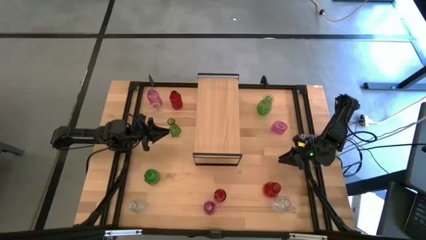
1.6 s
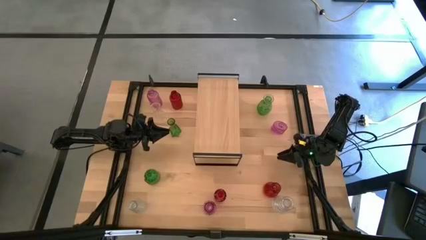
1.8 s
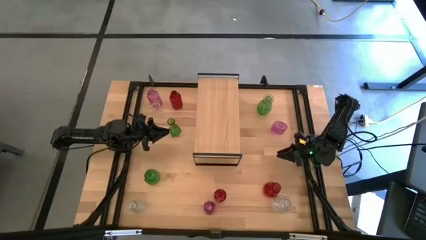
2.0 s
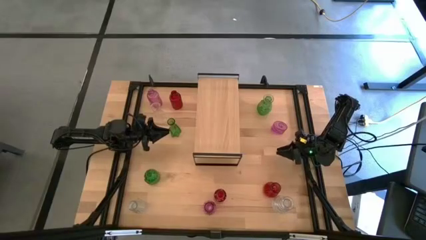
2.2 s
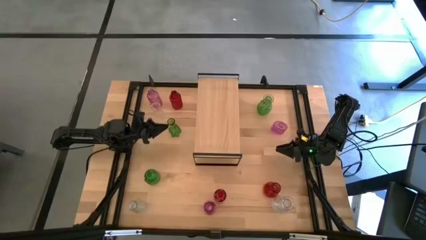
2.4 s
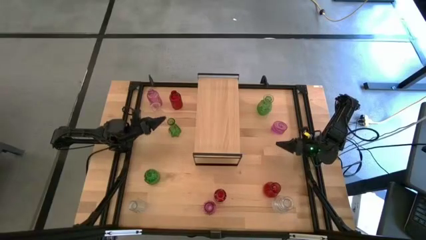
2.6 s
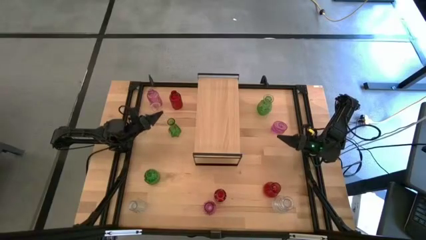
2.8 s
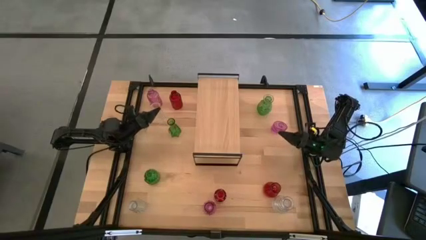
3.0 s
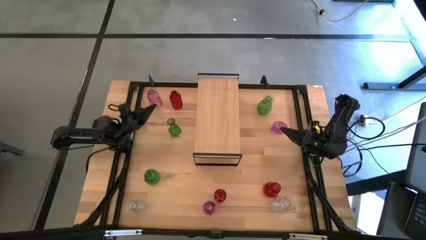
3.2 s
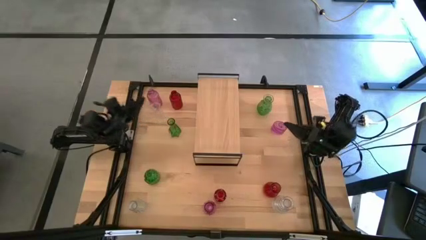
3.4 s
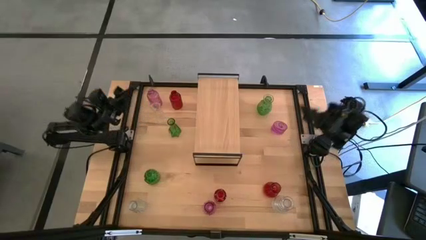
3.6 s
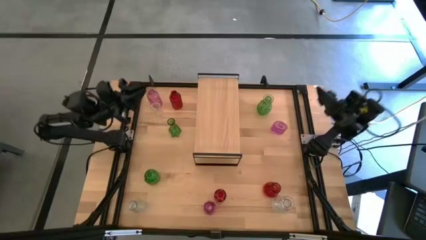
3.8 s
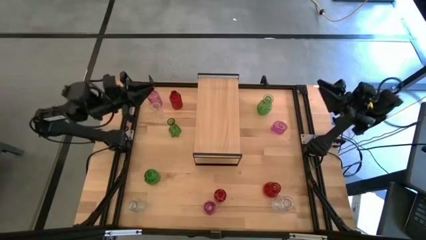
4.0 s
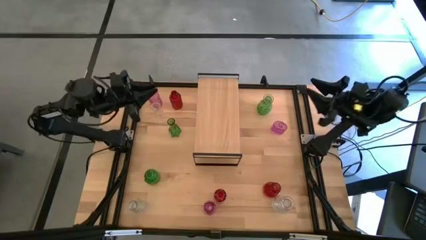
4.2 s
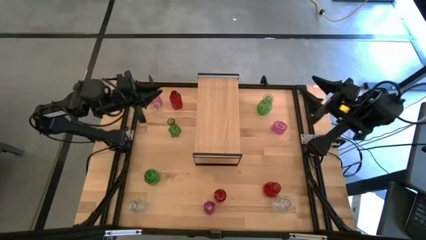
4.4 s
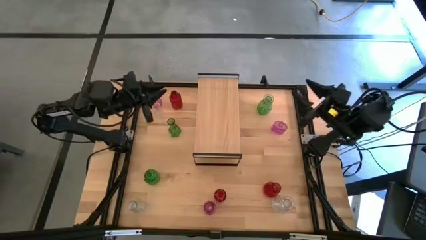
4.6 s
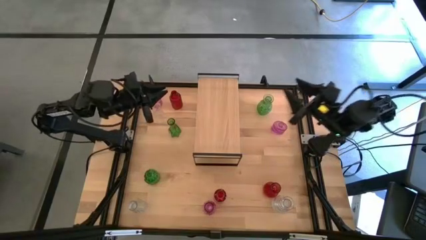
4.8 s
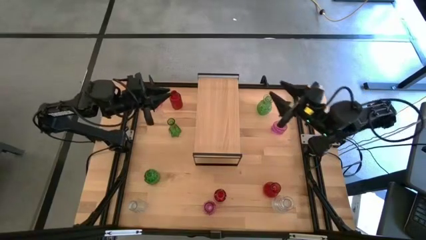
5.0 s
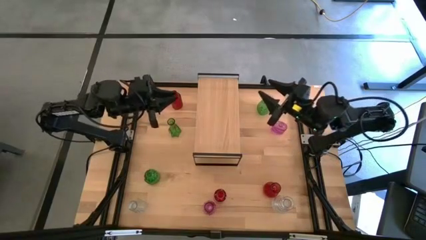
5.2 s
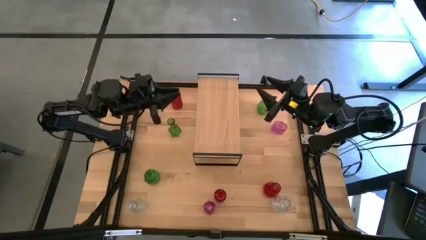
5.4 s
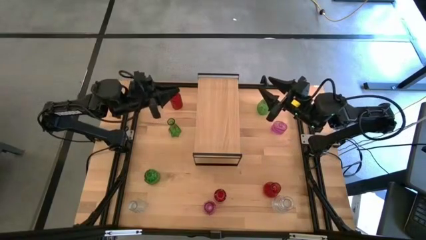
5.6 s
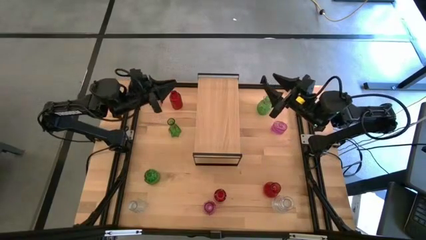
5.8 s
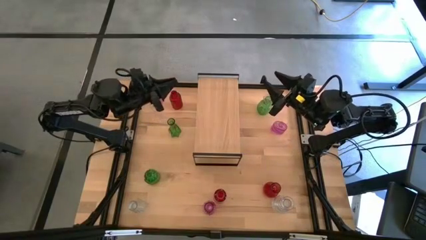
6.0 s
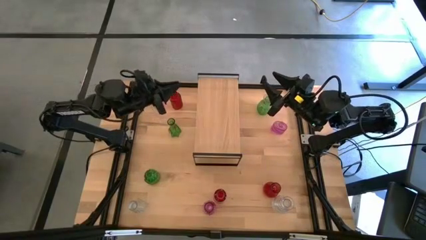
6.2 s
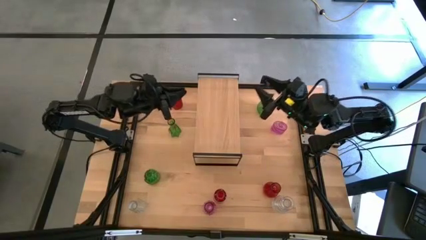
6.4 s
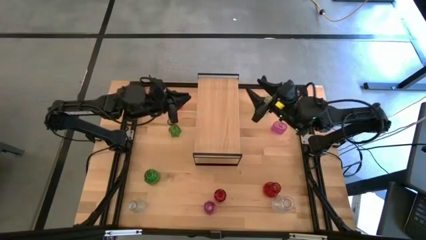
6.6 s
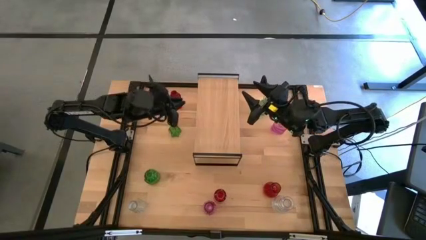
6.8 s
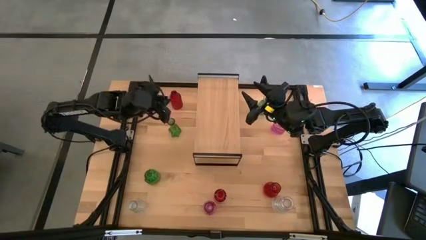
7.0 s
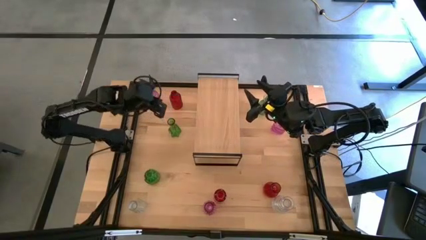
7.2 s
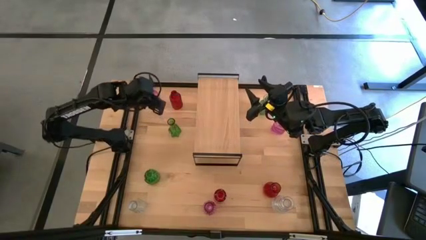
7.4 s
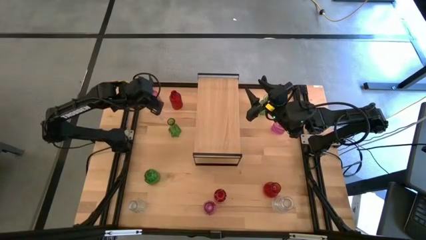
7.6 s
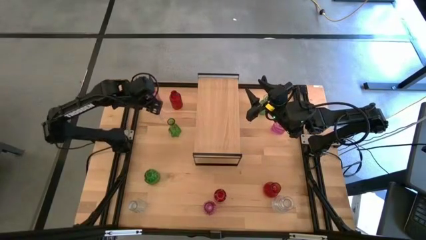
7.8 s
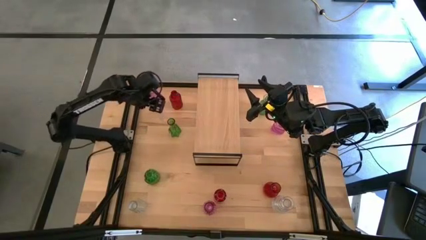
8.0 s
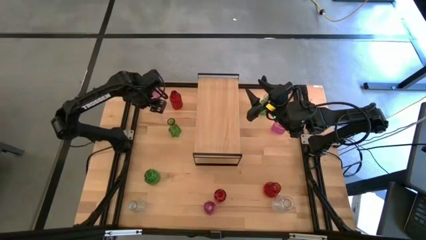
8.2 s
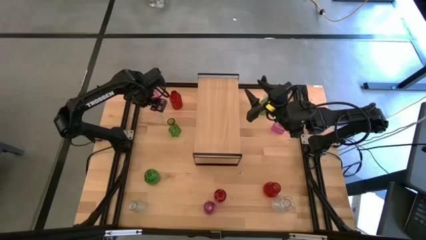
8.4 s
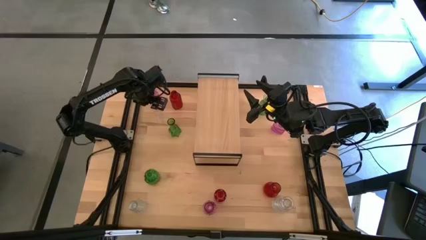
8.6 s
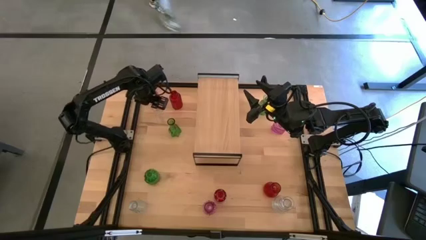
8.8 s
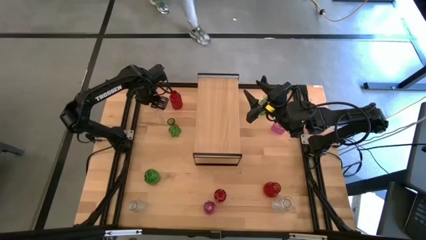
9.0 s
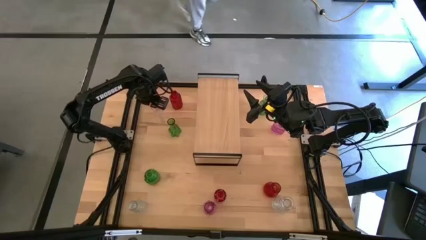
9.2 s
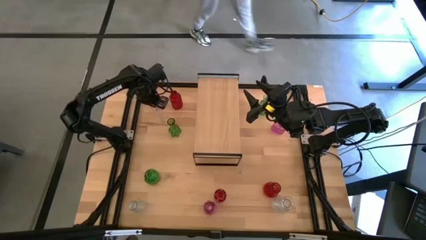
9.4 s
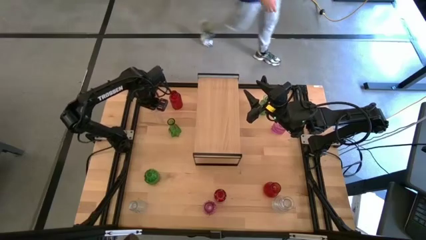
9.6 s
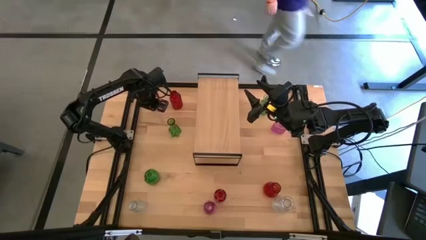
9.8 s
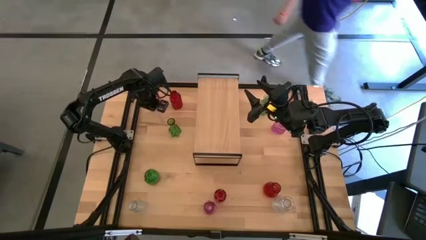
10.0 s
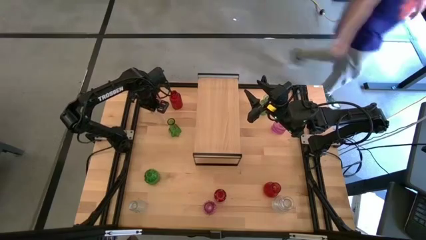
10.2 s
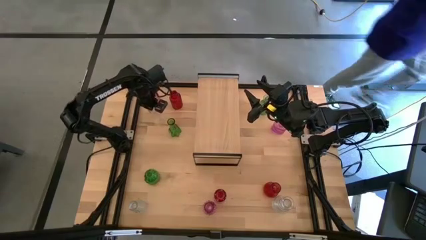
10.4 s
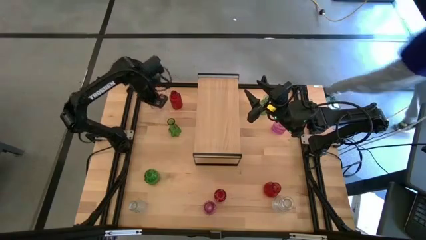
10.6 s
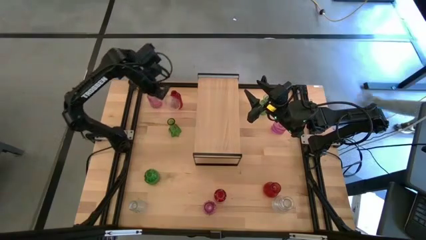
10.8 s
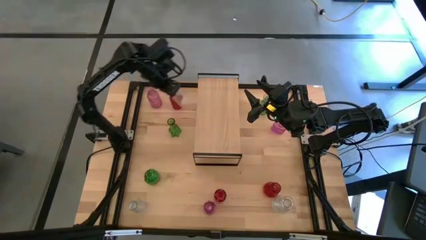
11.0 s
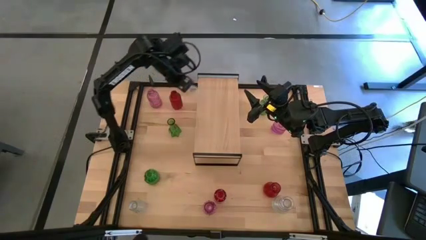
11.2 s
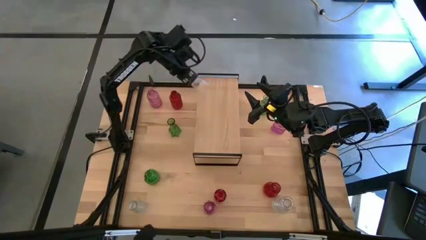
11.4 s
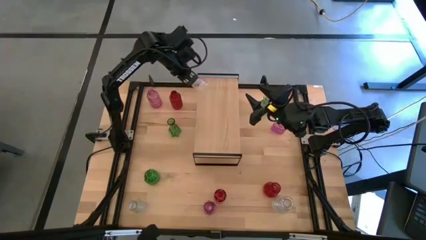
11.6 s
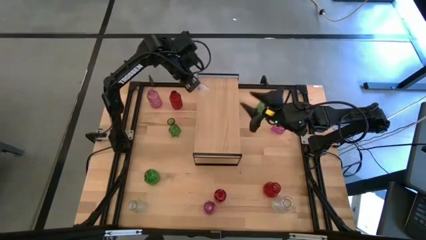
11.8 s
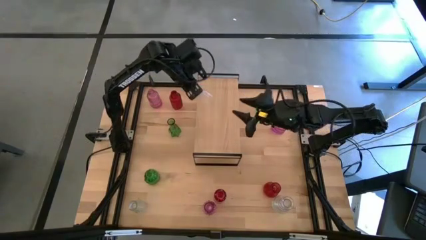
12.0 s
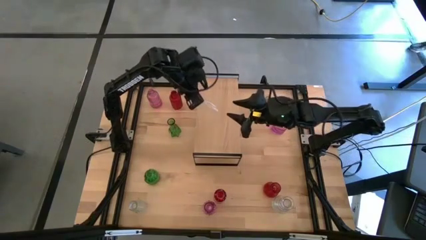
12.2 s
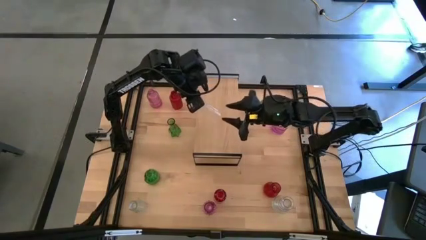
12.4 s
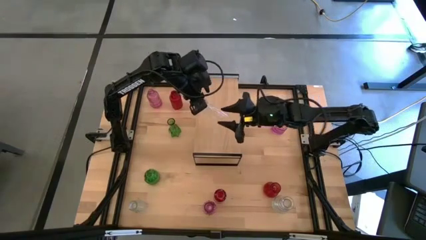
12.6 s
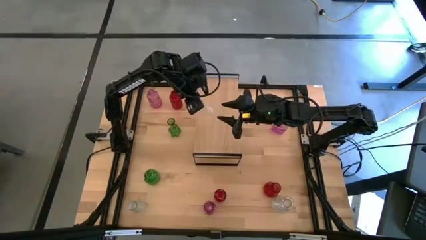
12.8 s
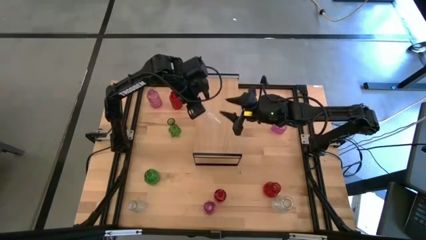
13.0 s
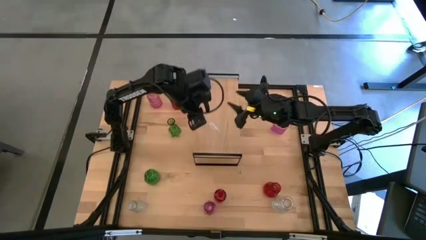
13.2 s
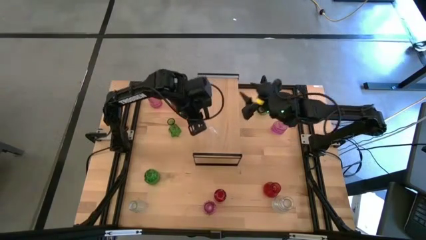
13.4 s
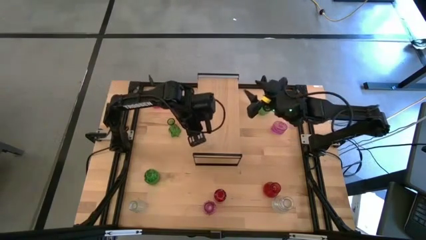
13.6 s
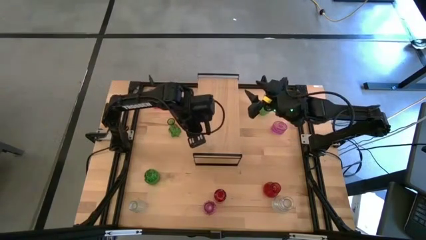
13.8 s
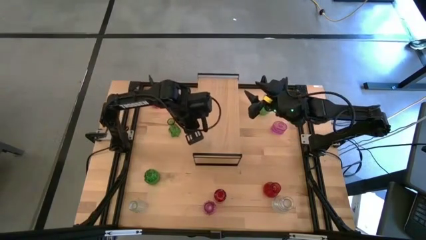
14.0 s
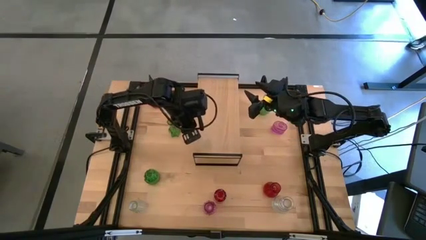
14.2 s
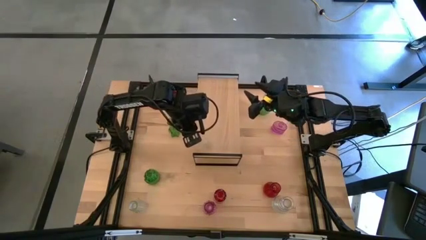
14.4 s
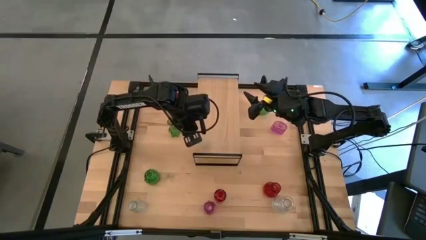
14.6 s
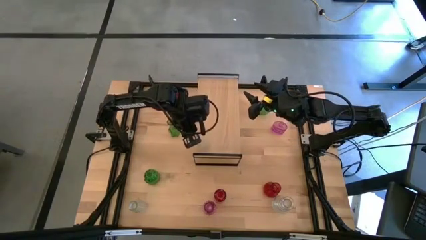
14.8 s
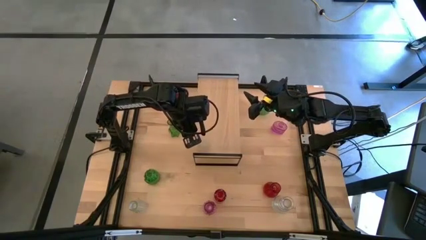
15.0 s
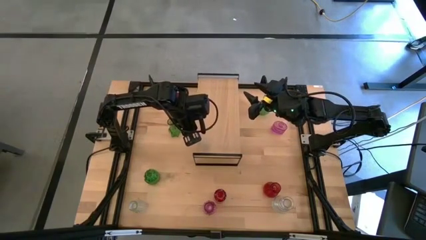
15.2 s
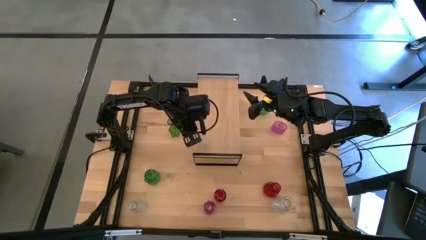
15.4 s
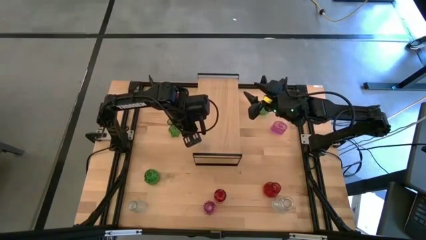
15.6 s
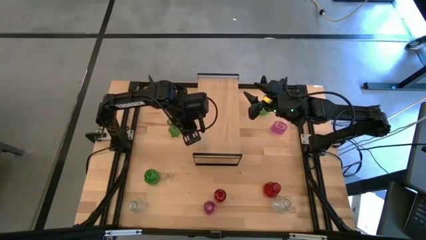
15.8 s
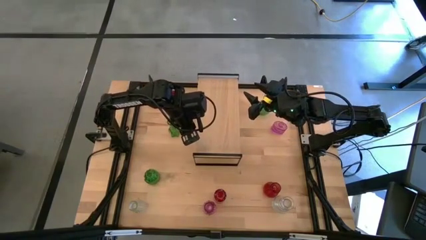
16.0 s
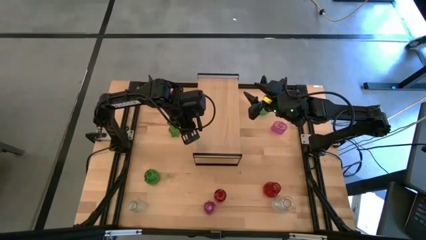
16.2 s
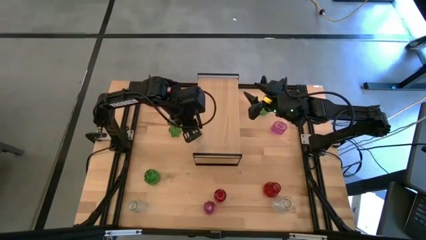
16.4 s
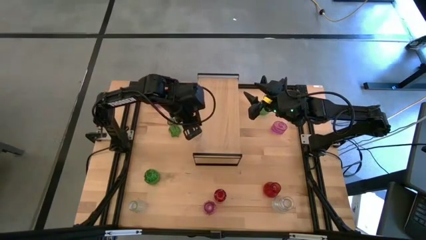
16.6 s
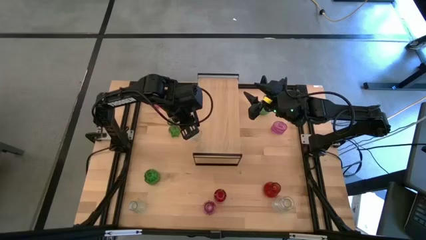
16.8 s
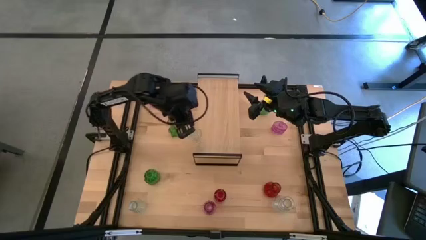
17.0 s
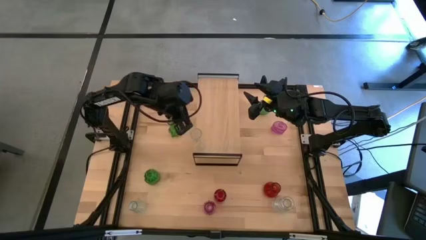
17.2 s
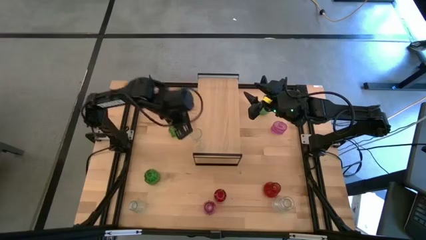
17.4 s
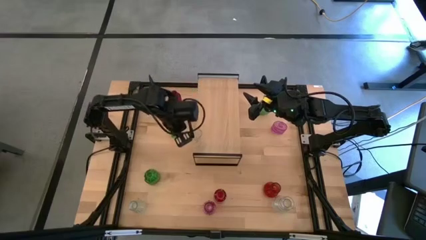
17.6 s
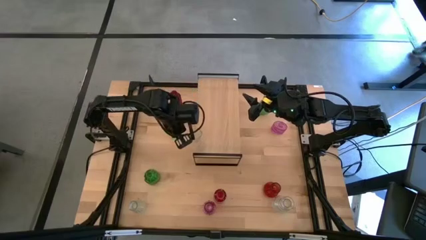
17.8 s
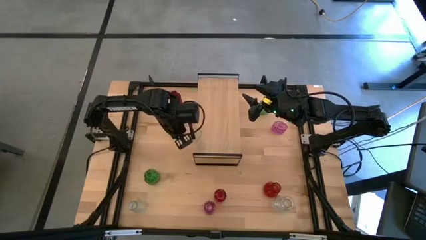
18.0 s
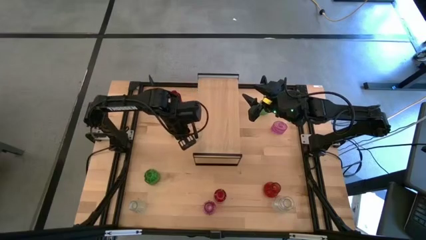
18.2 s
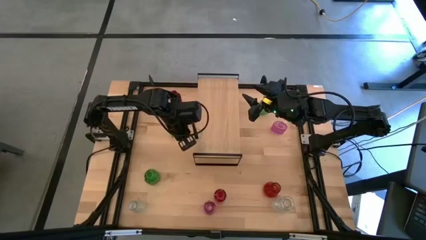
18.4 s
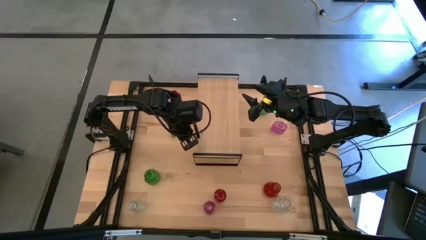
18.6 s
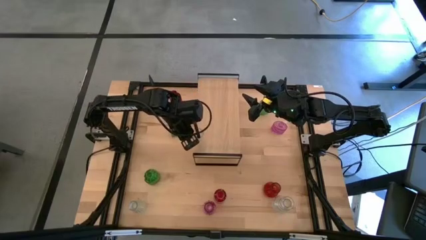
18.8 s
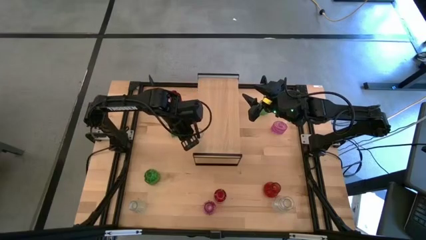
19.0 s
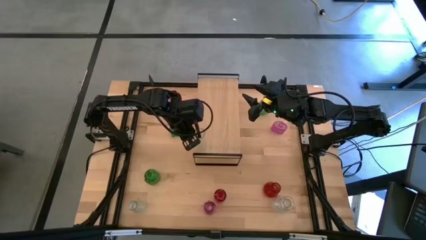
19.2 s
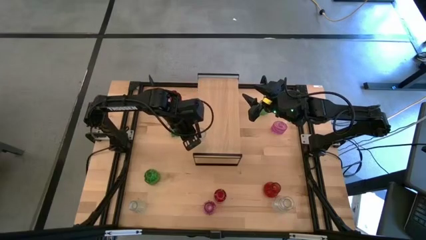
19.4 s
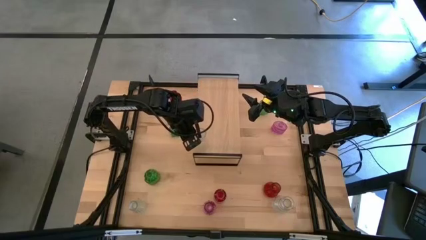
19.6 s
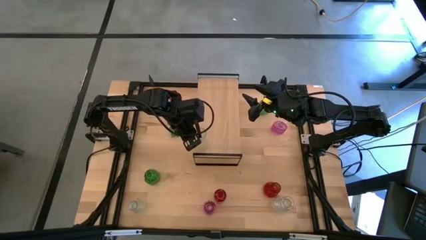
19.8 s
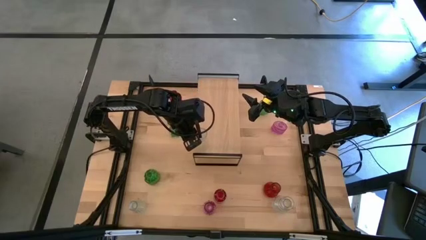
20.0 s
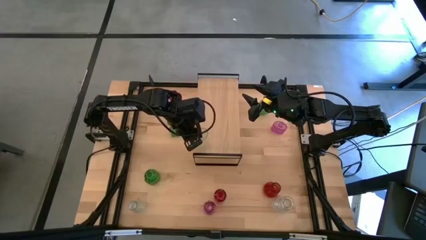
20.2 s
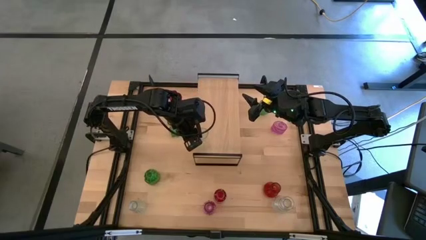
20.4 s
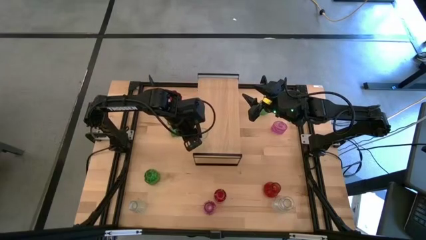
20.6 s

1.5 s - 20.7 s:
Task: sort vases onto shelf
Put the top transparent vase on the shelf
